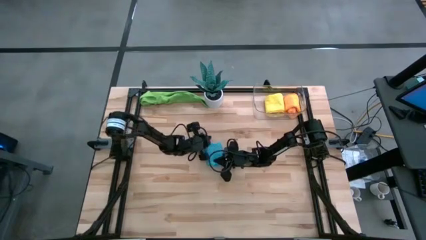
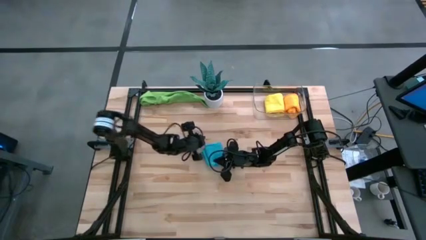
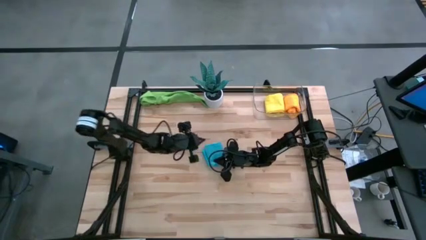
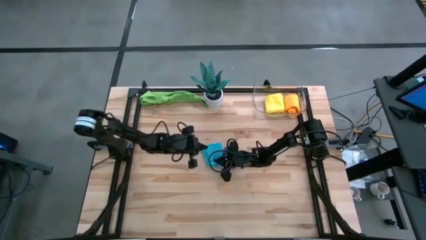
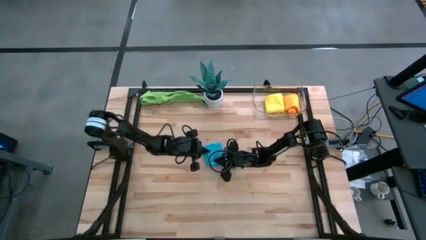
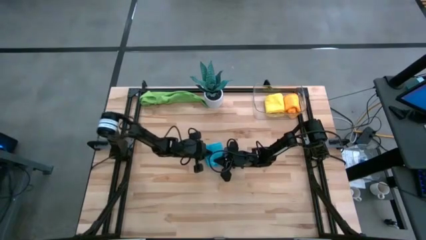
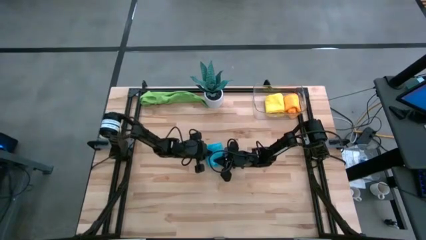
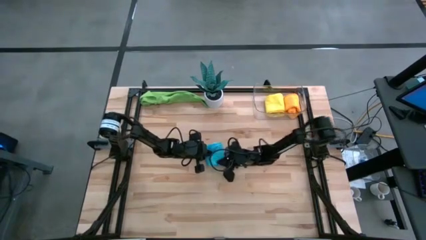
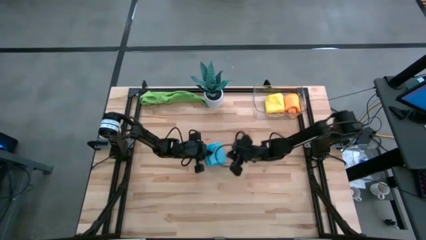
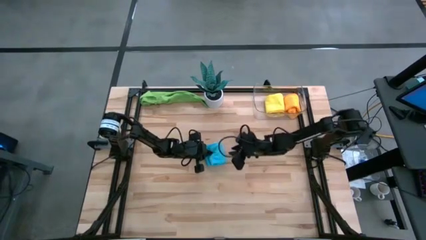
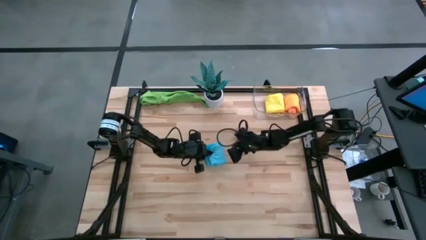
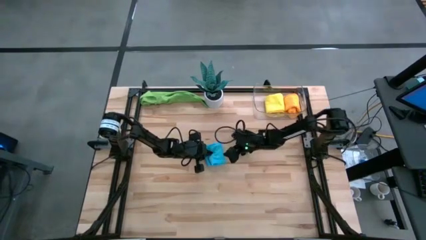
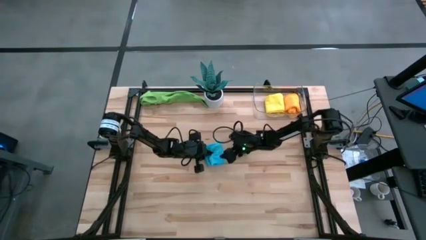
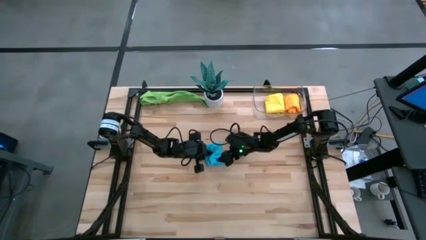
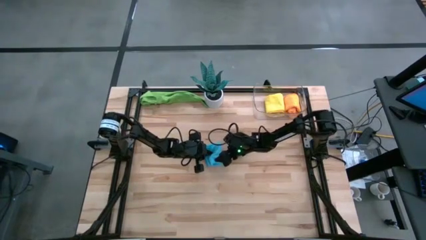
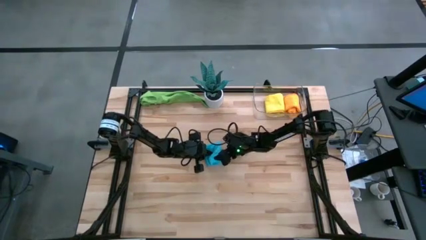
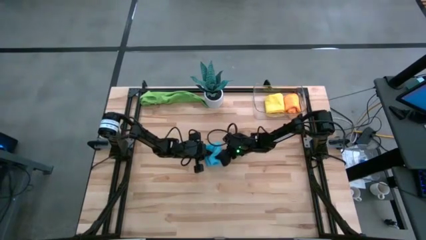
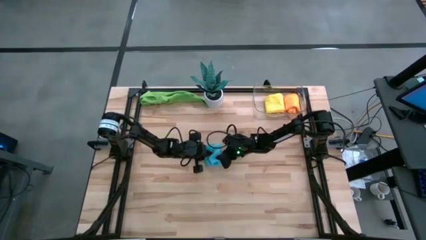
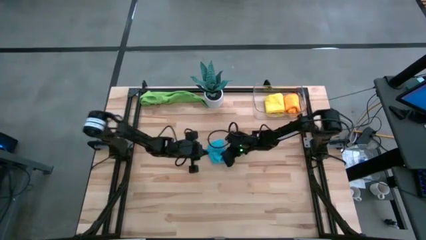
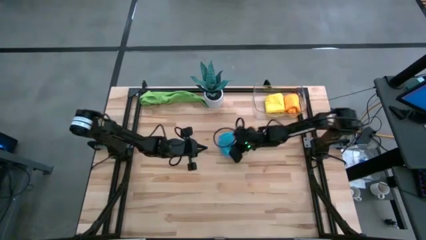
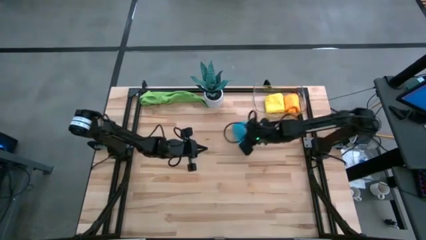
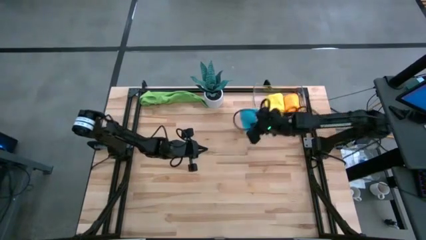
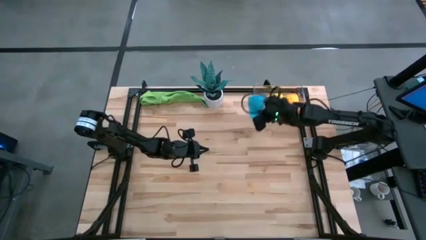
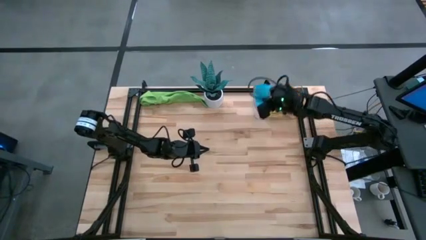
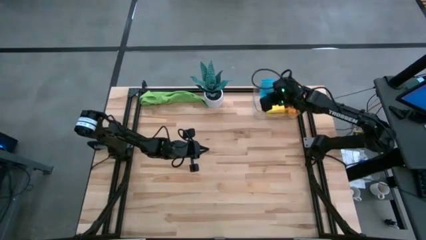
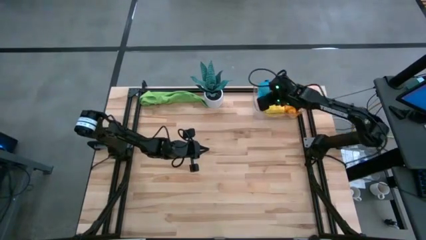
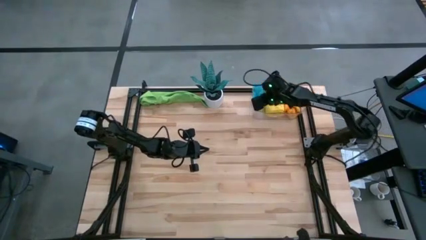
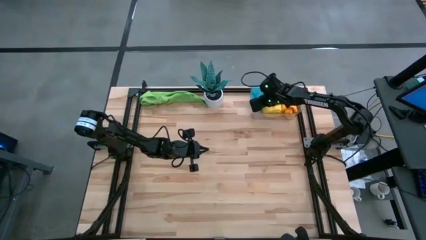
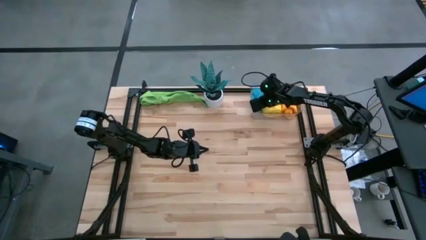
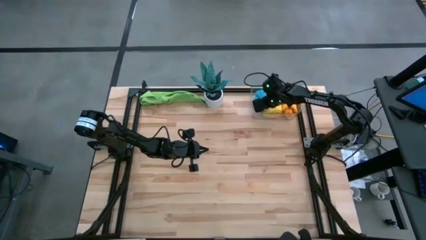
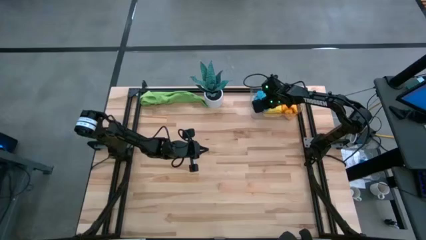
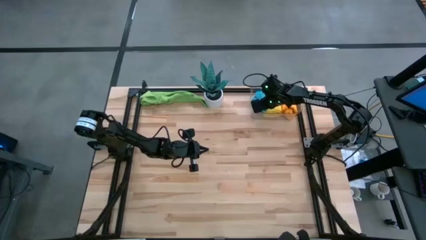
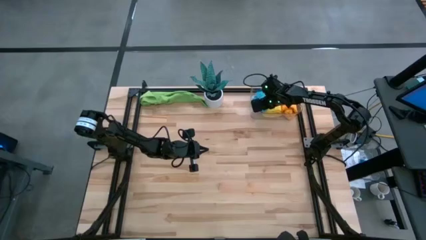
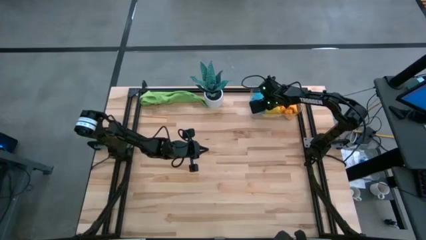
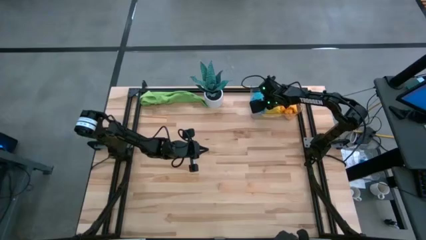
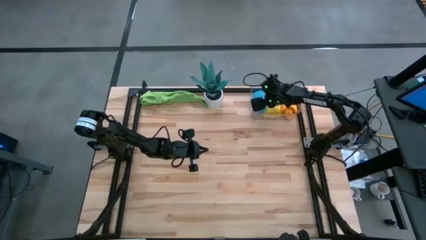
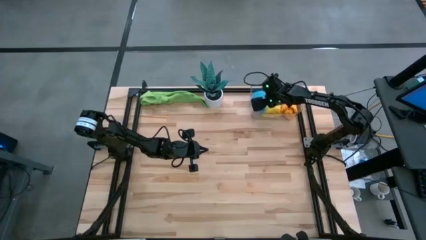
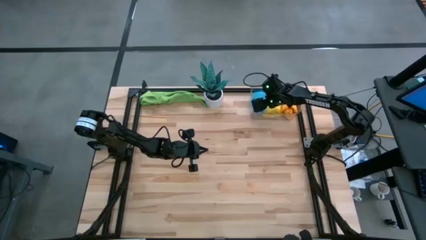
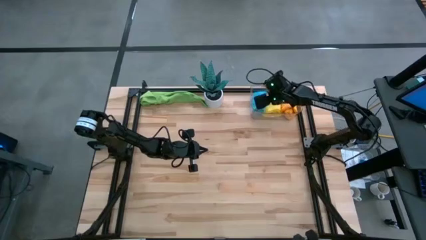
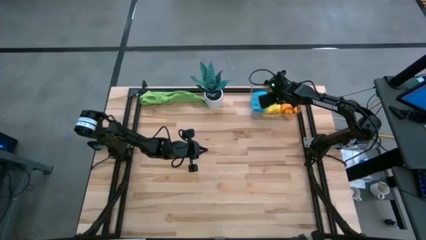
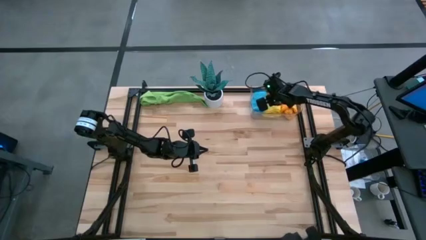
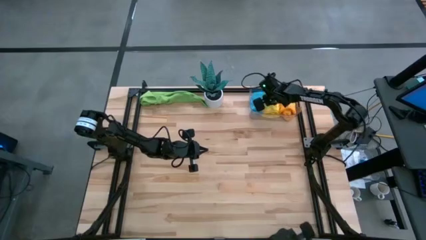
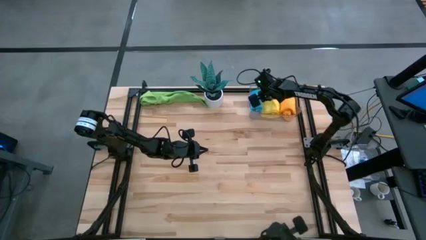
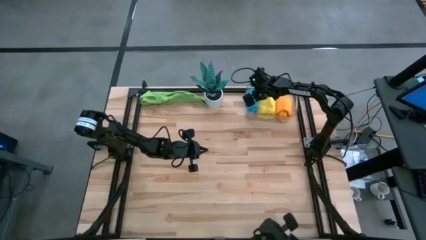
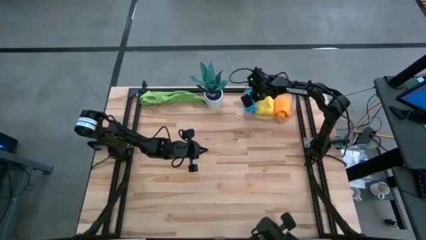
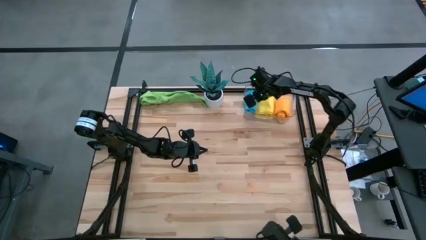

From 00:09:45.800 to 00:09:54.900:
Task: Roll microfiber towels into tight, uniform cylinder then place into a basket
Put the blue microfiber cloth into the transparent bin

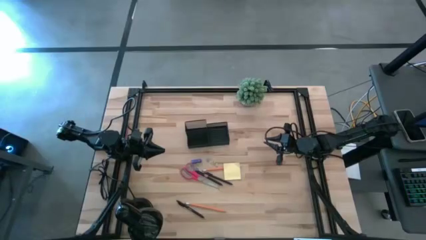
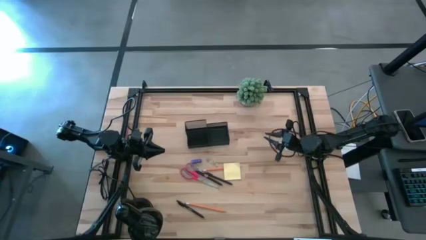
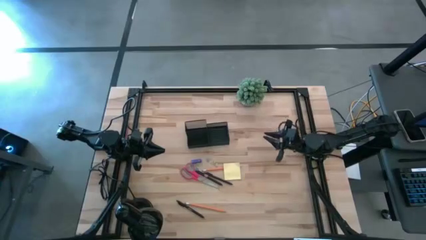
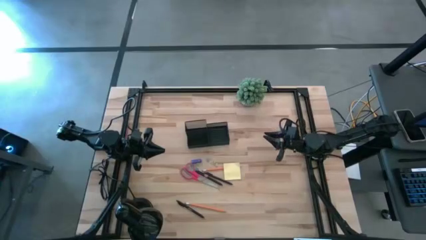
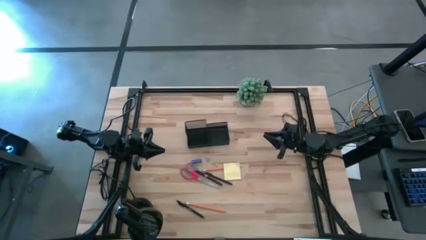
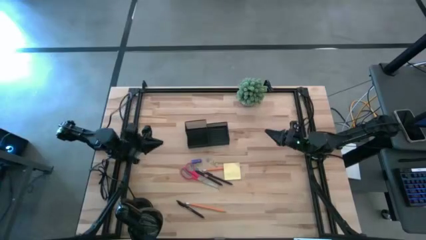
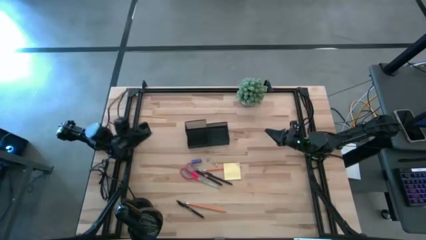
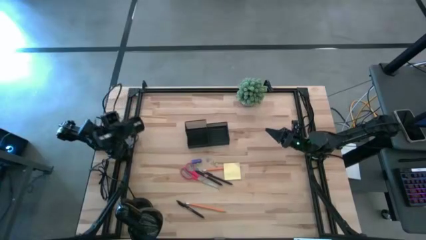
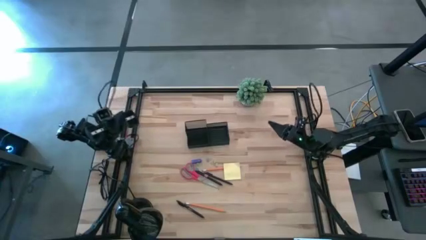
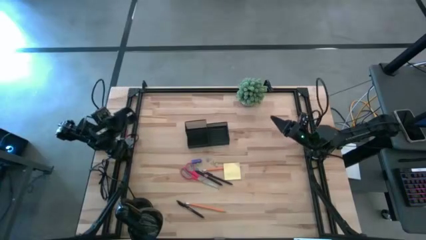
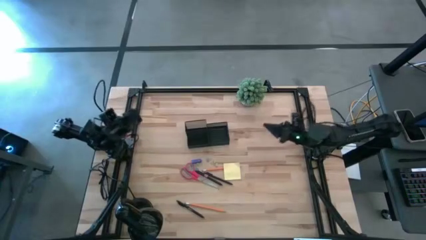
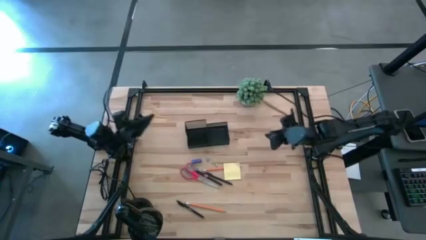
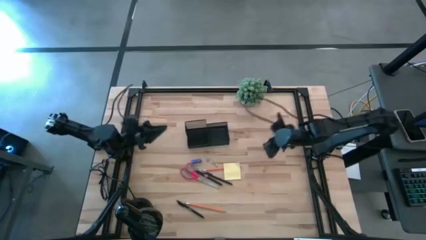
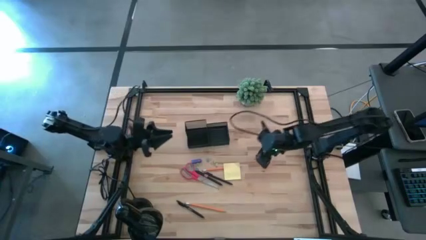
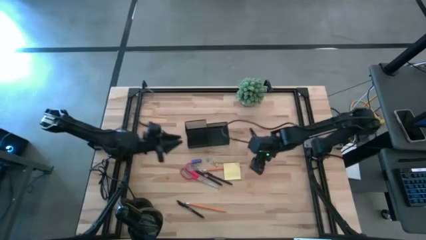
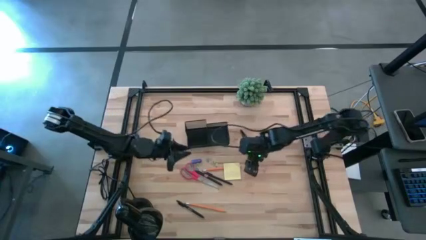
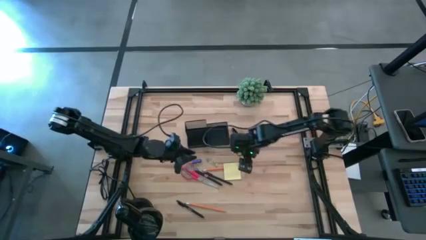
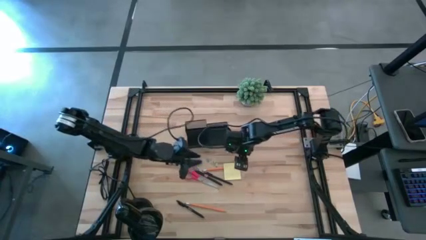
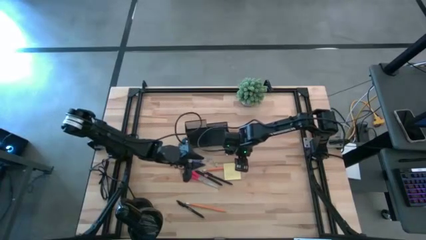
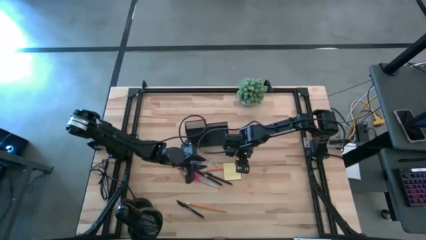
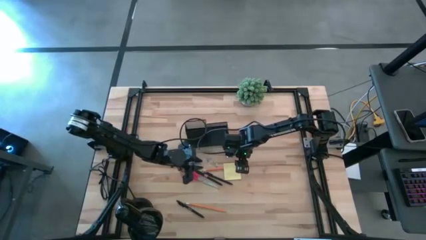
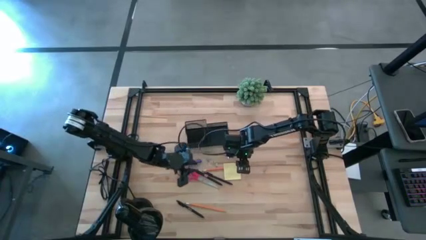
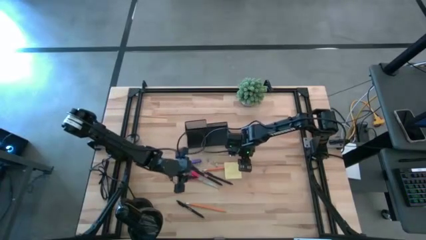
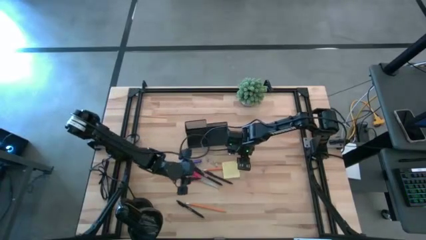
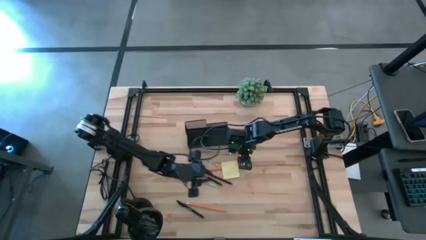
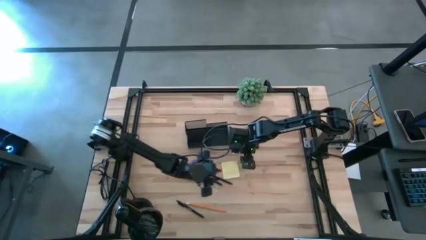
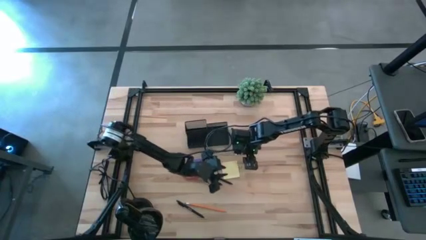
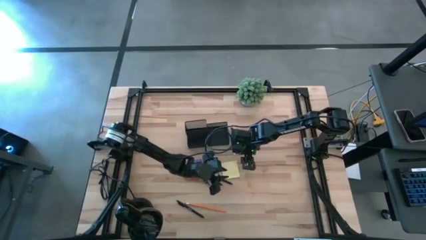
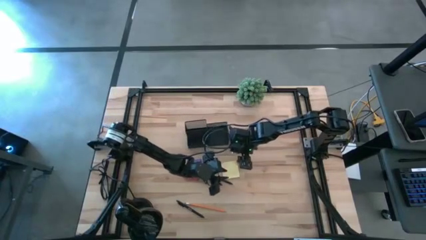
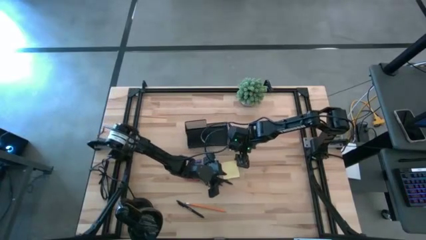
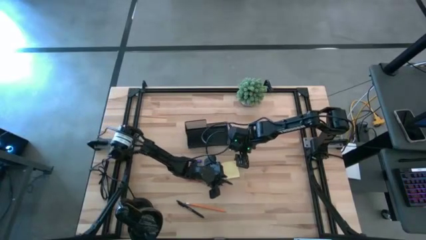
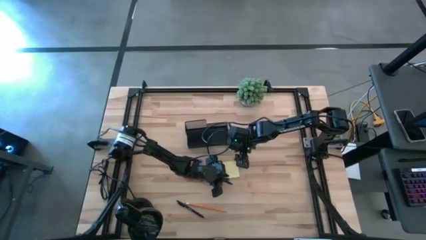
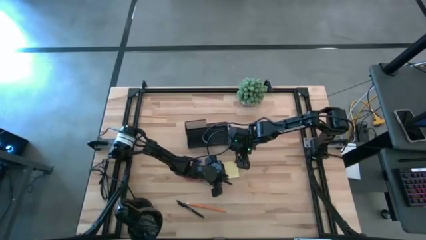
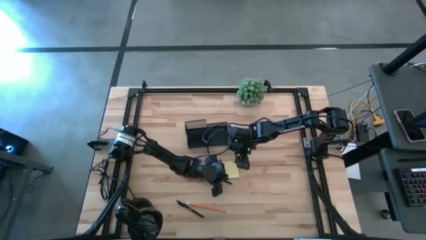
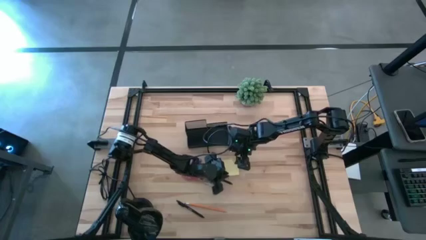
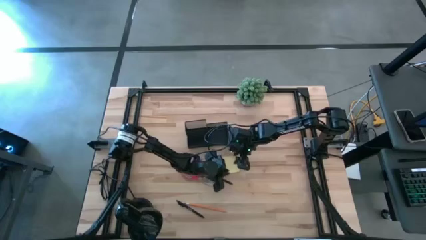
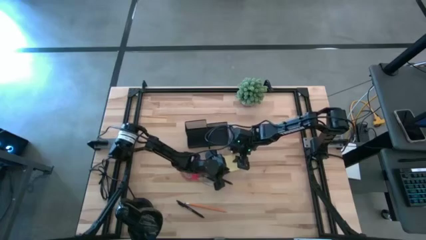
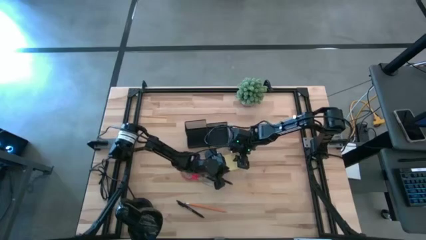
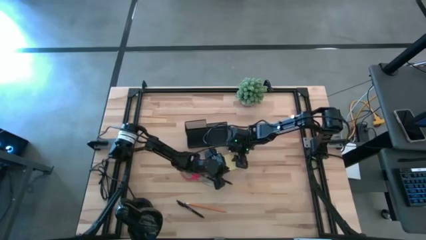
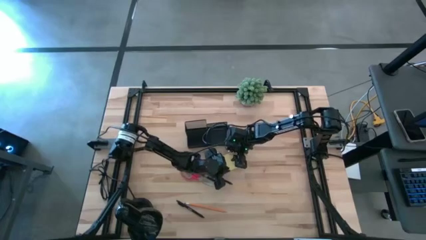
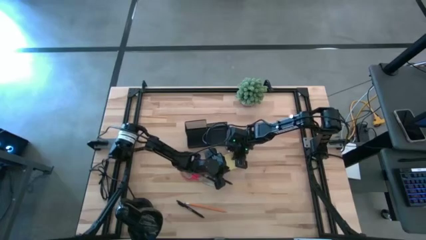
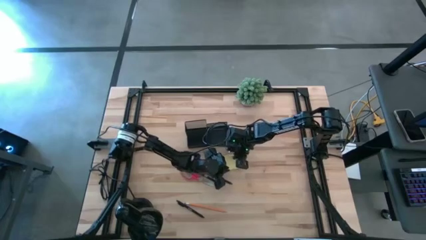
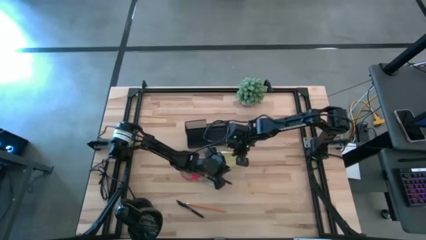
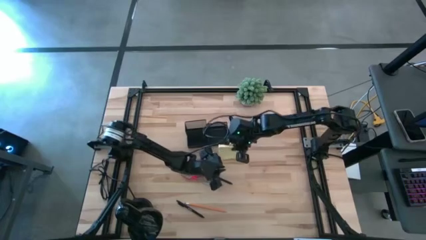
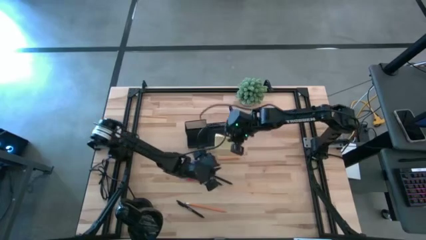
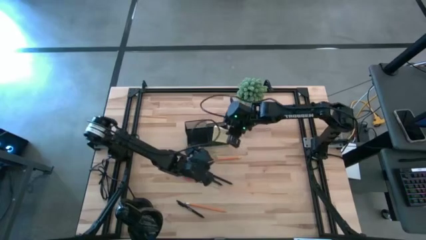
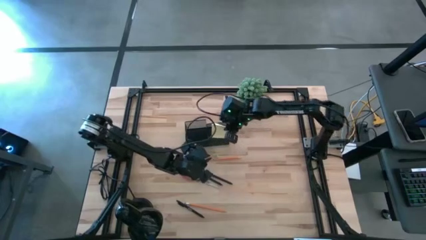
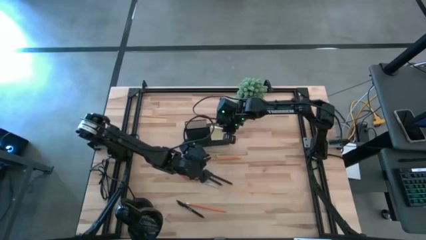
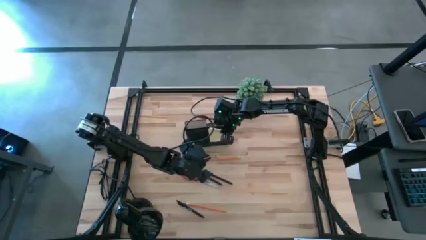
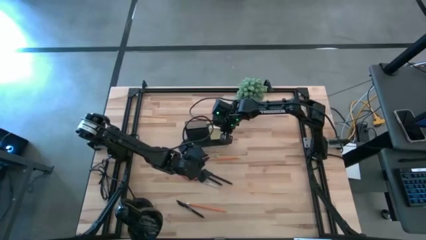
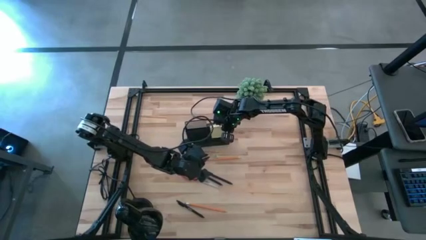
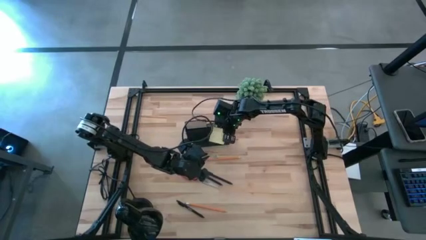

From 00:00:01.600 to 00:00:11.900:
Task: Pick and place office supplies into organizer
Put the yellow sticky note into the desk organizer
